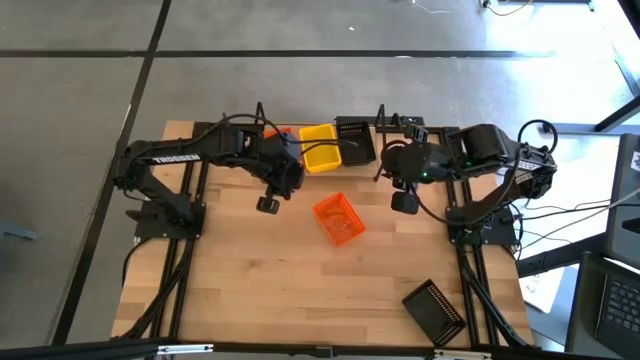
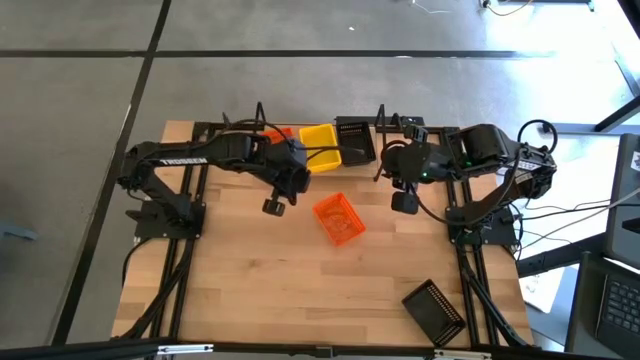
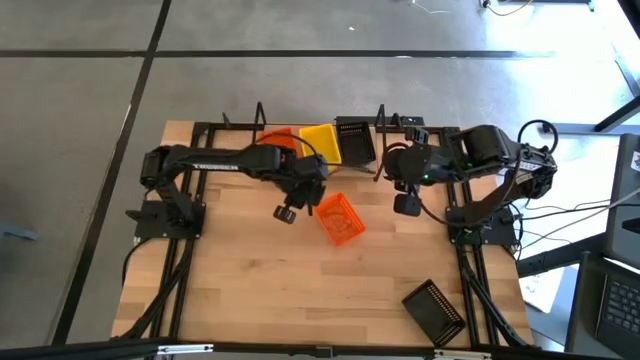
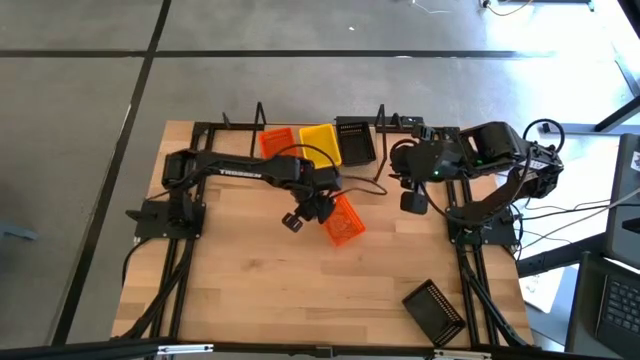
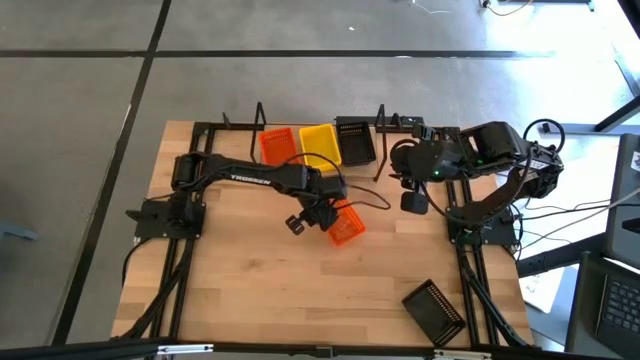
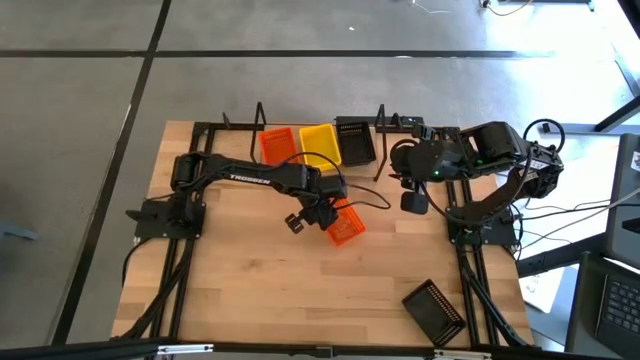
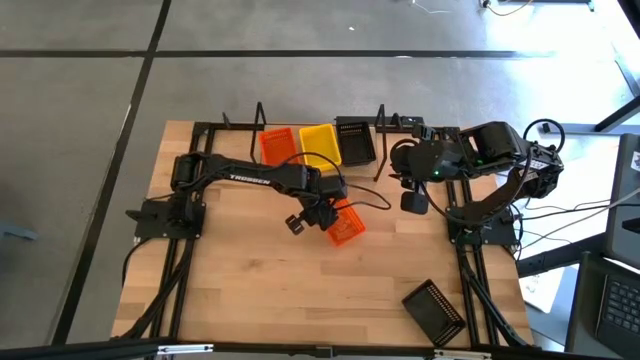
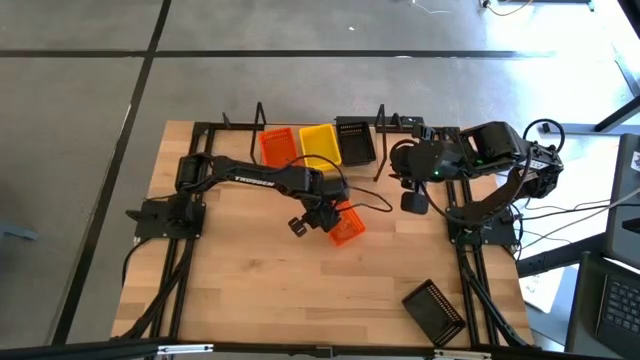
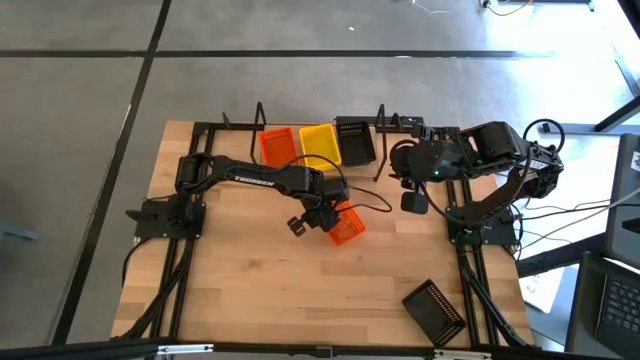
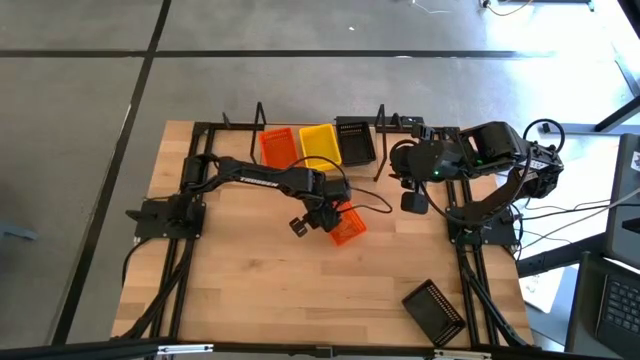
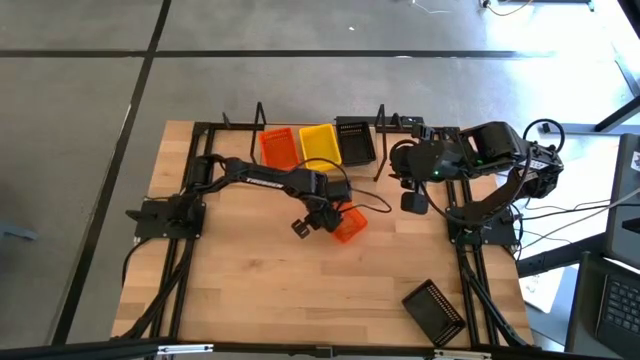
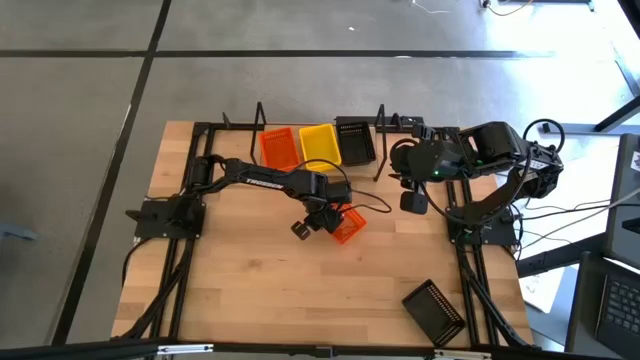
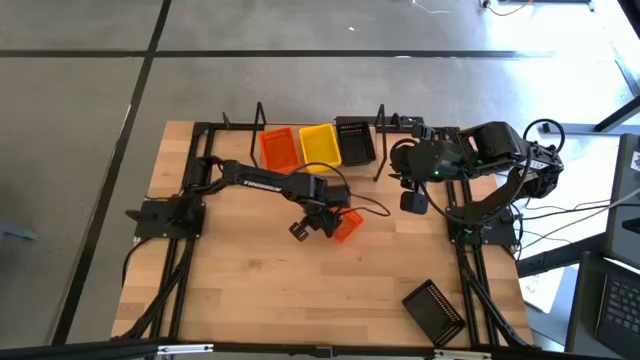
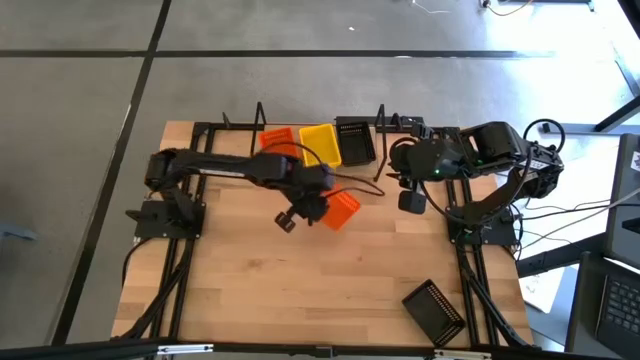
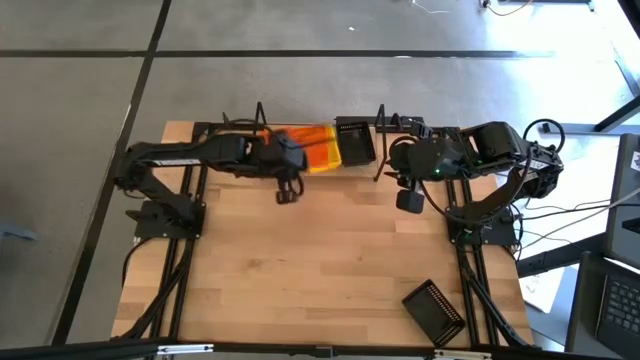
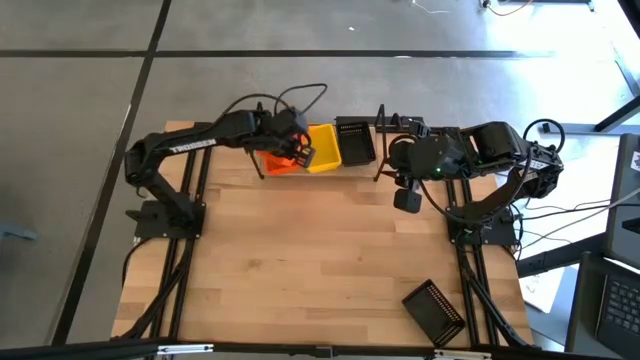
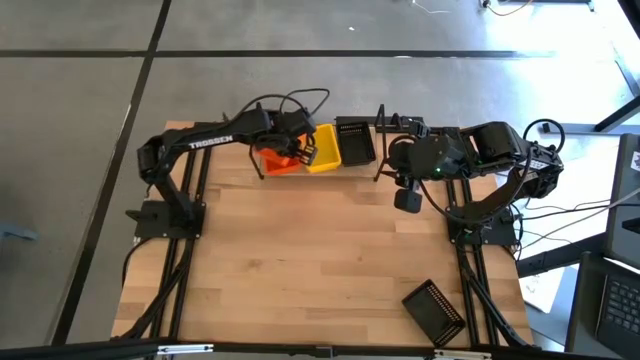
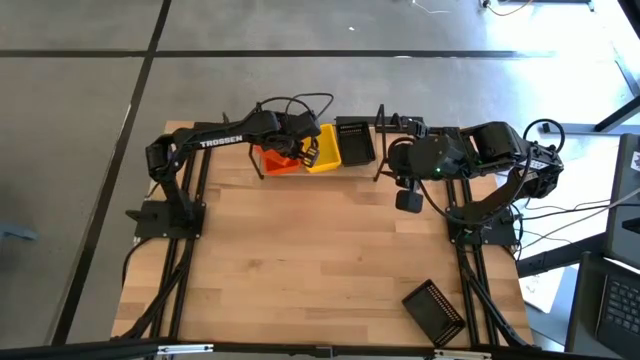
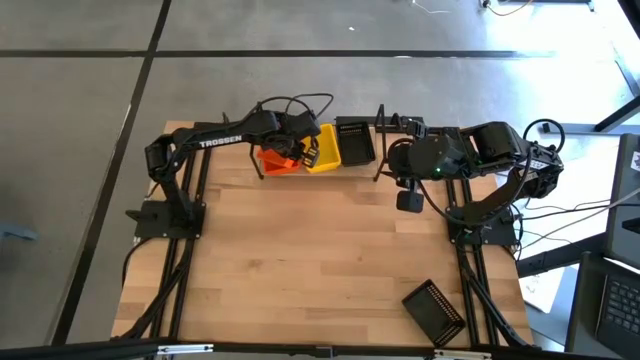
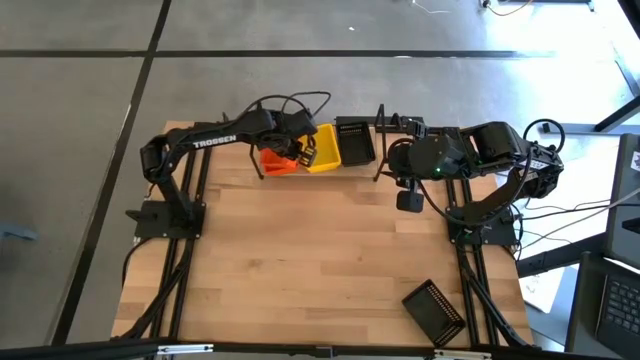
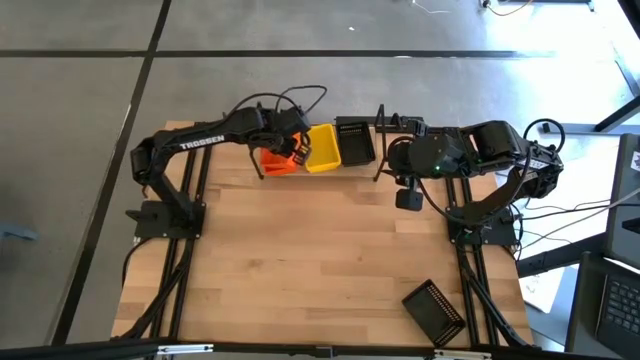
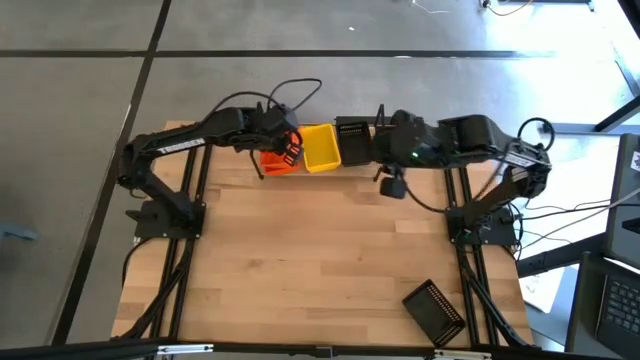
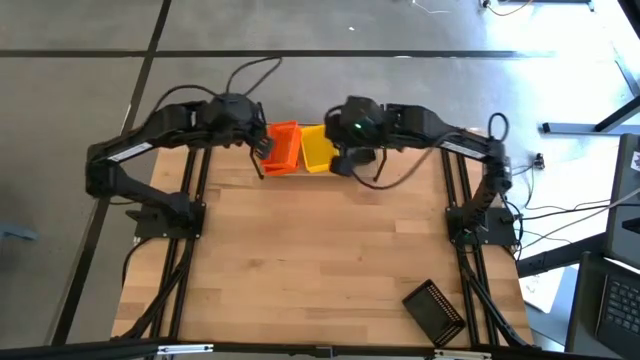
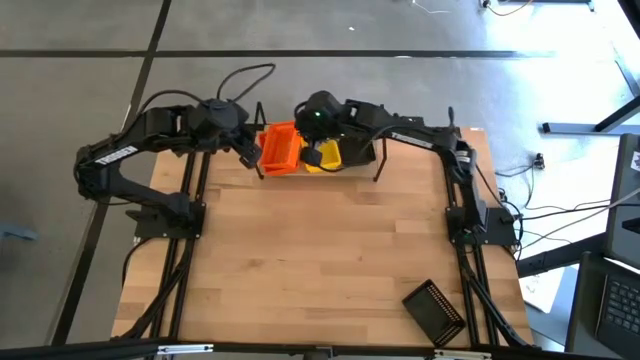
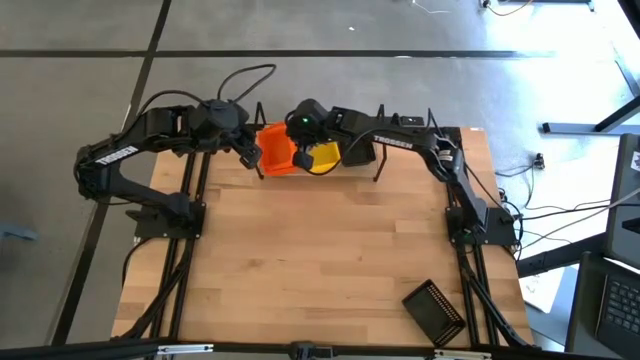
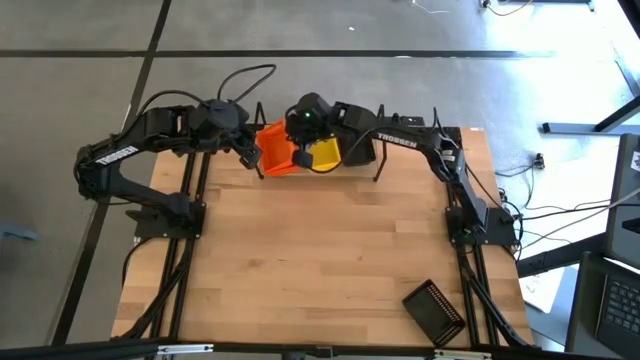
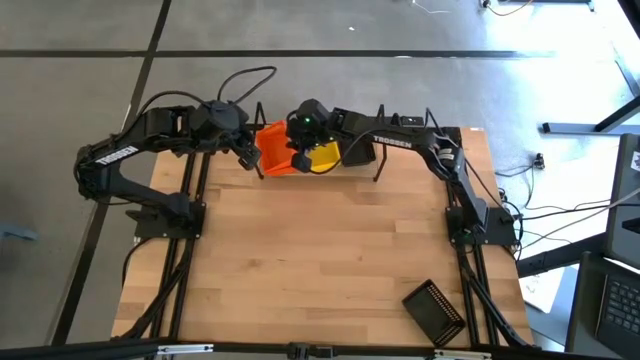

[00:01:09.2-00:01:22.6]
Task: Stack baskets on shelf by color
Stack the orange bin on the stacked bins on the shelf

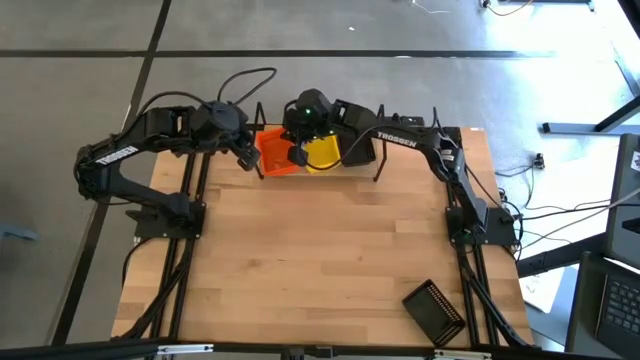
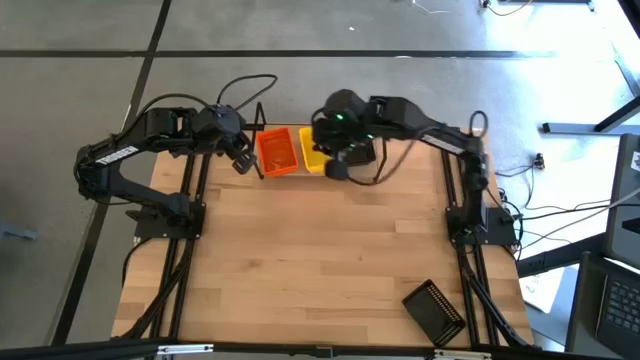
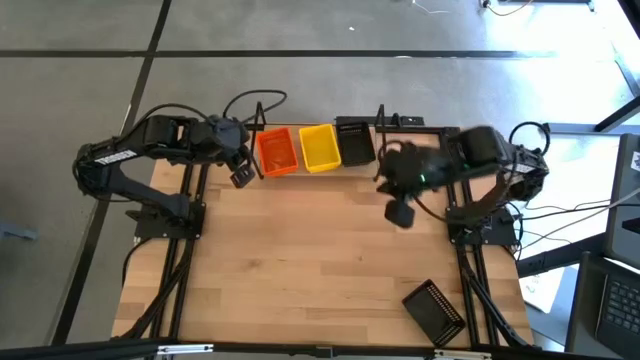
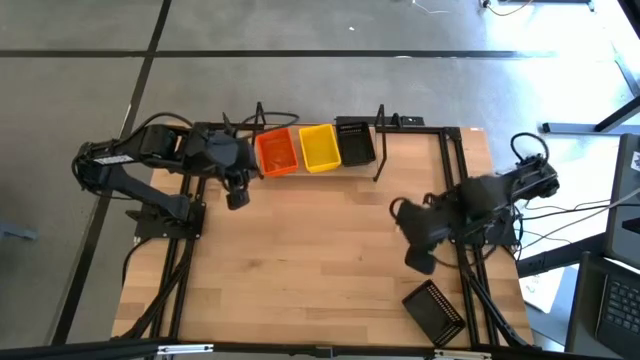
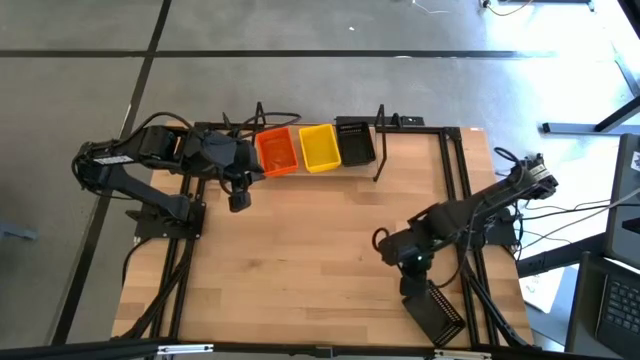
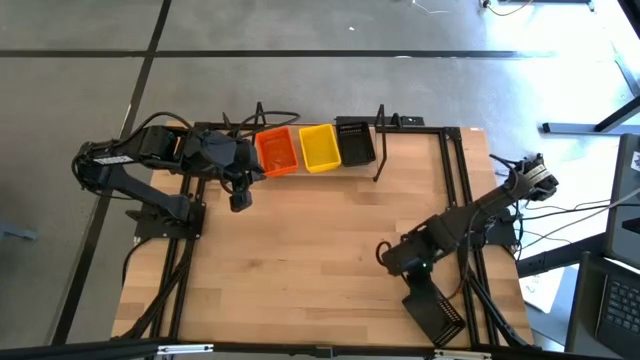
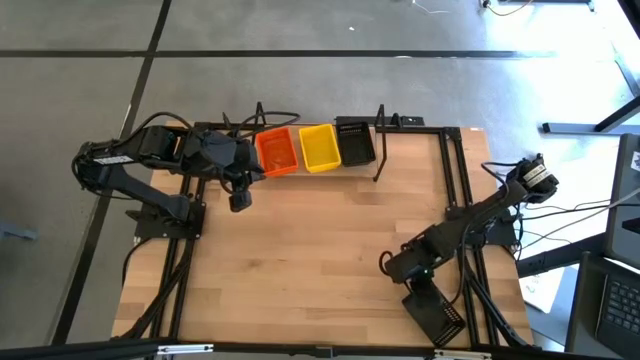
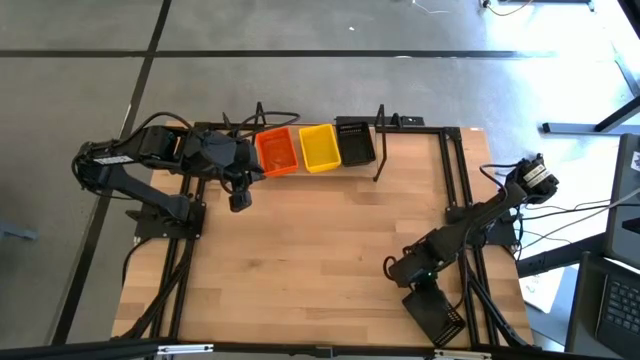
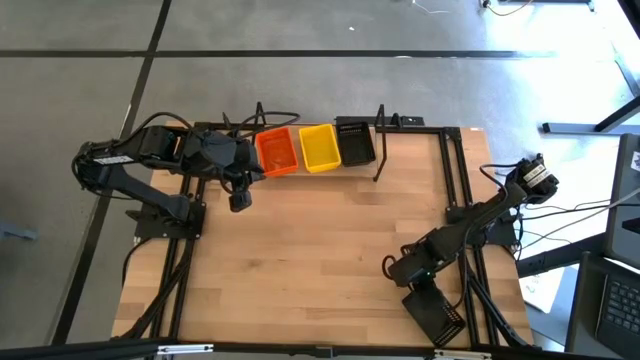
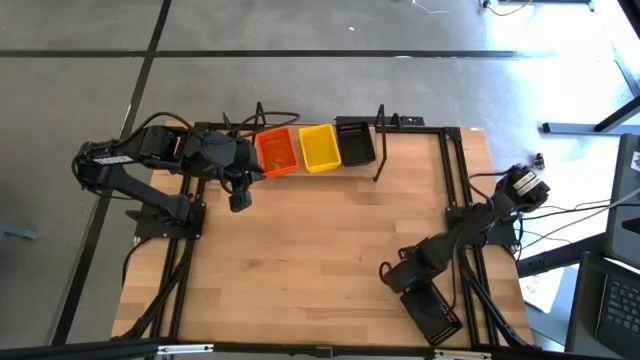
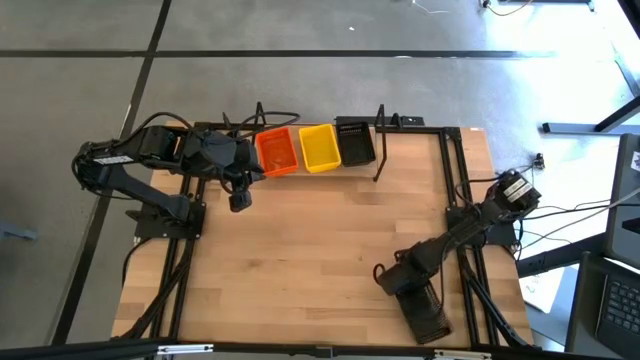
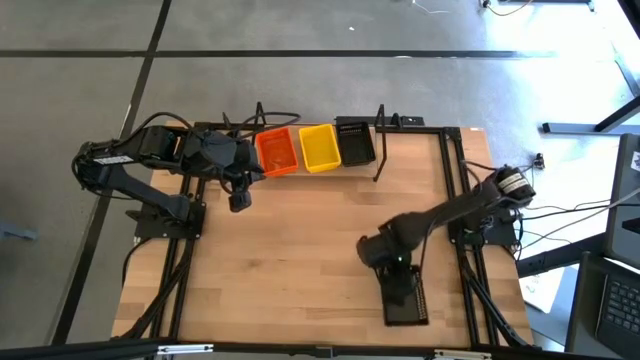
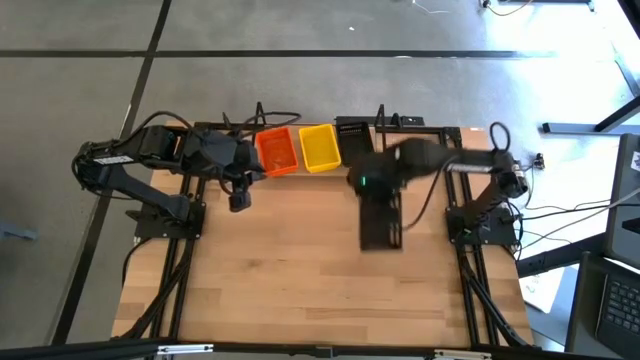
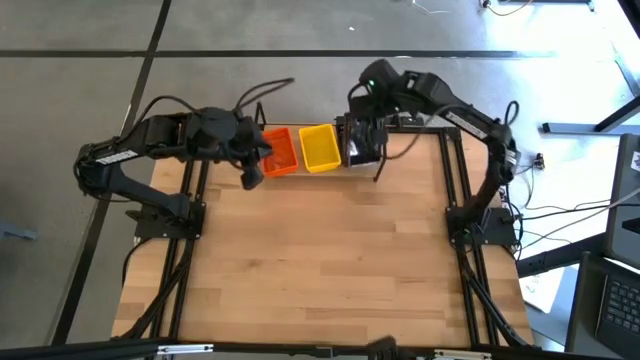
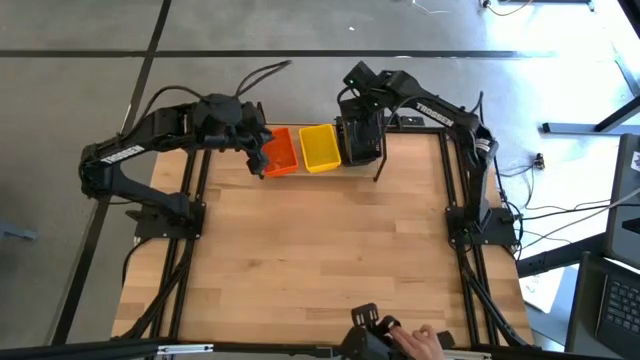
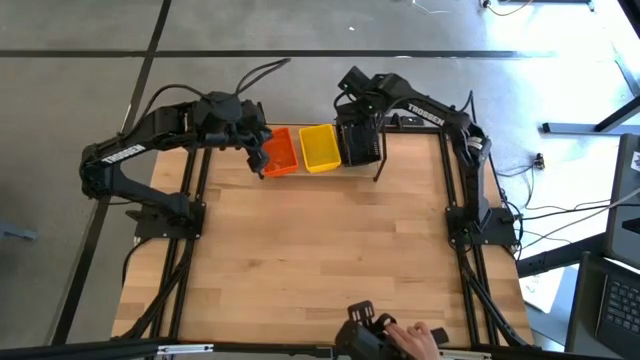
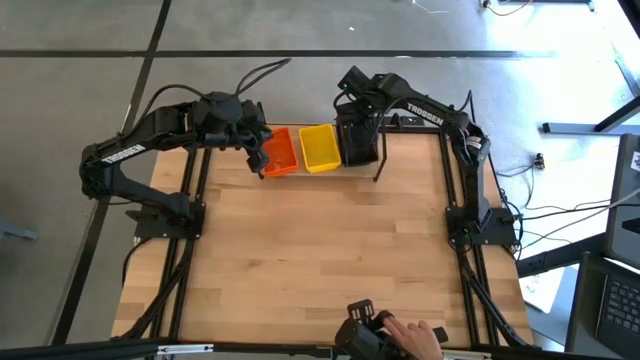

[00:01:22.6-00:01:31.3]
Stack the black bin on the stacked bins on the shelf
